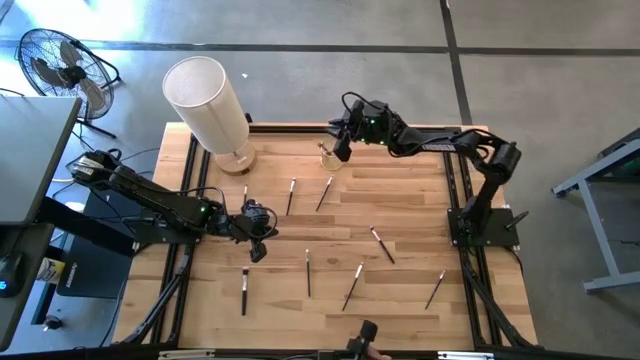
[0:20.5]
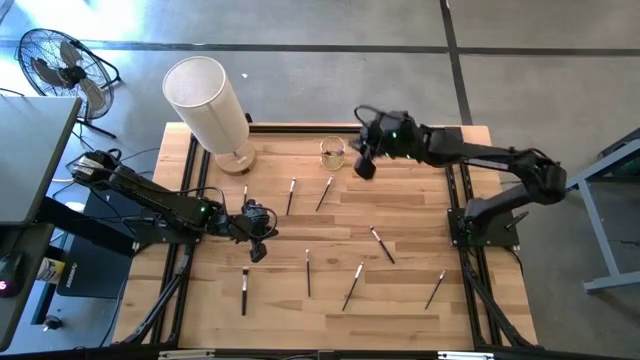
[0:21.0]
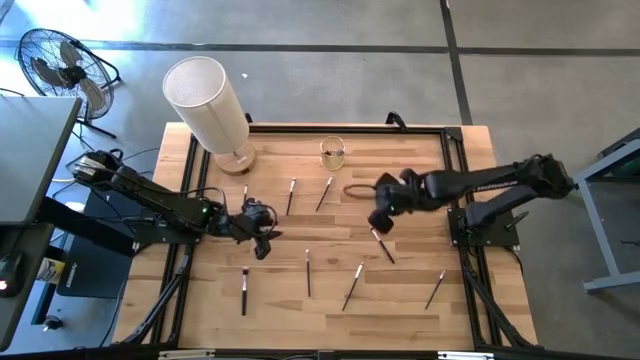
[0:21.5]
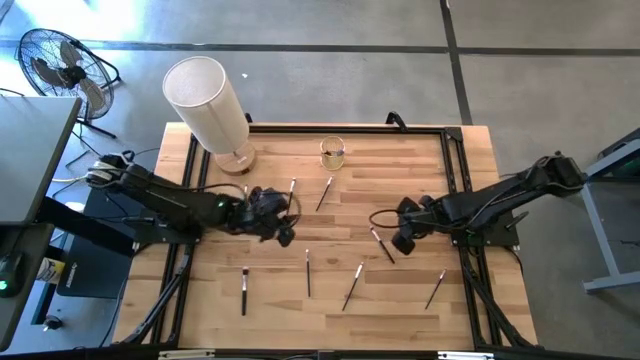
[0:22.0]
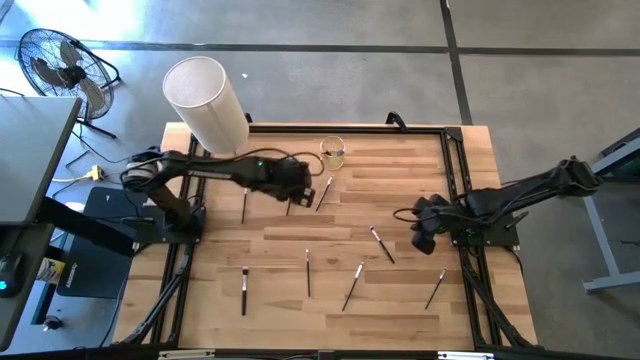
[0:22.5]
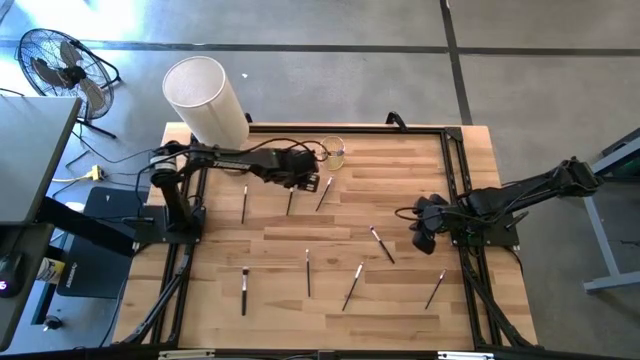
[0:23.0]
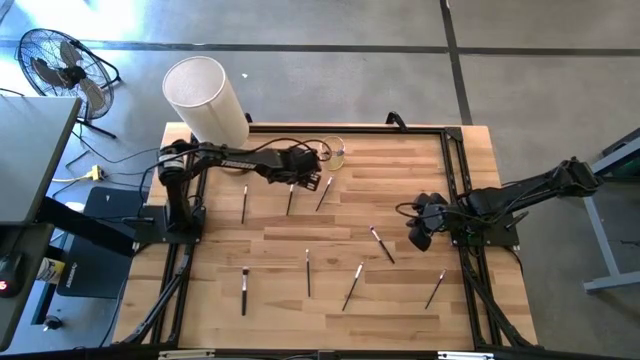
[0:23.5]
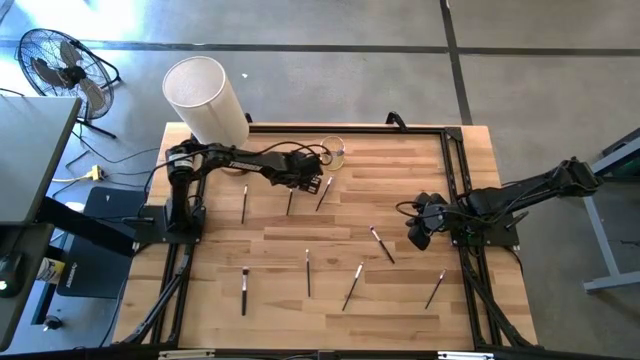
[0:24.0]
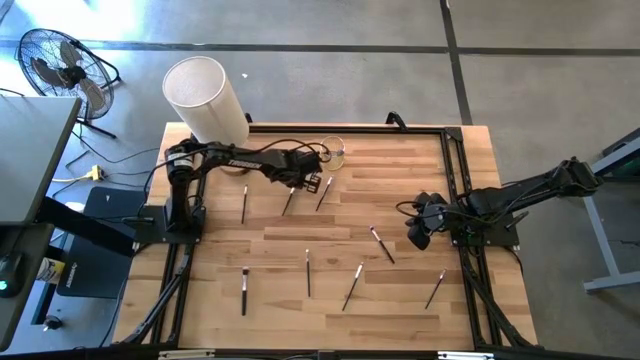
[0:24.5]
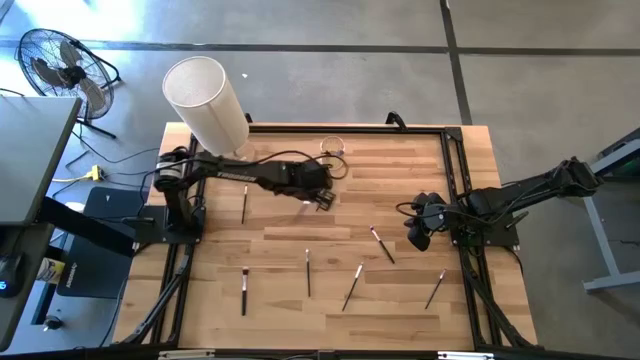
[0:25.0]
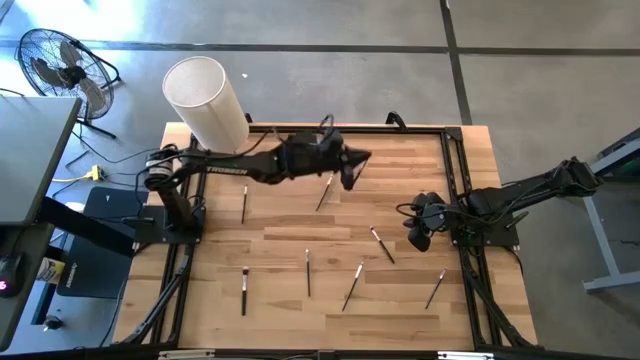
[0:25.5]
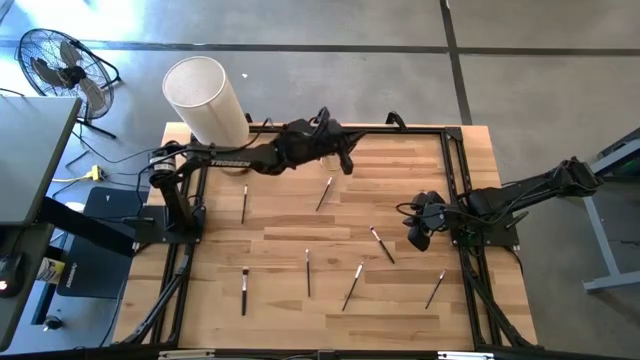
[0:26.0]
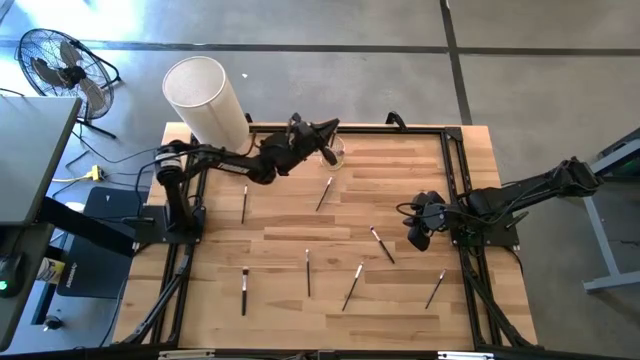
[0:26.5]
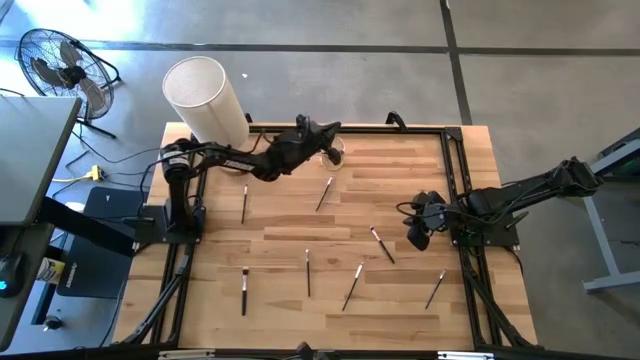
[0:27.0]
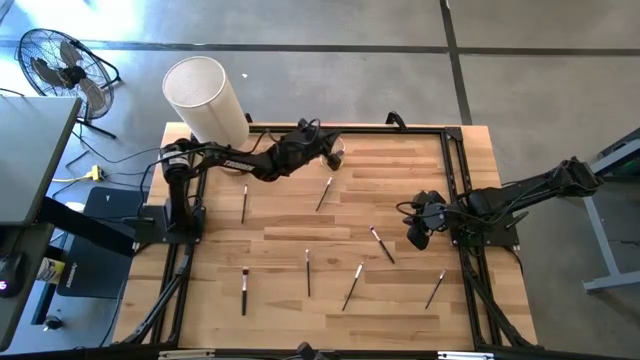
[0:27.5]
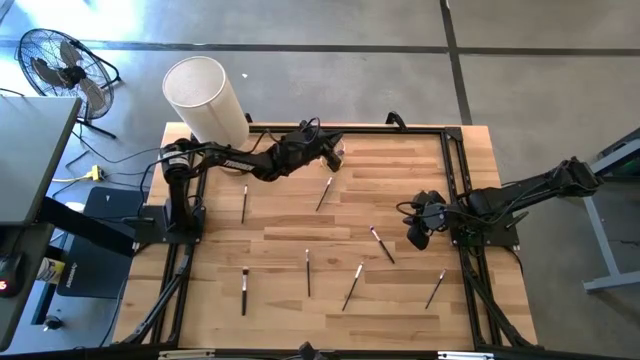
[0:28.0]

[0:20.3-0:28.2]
Task: Sort items
Put the angle shadow brush into the glass

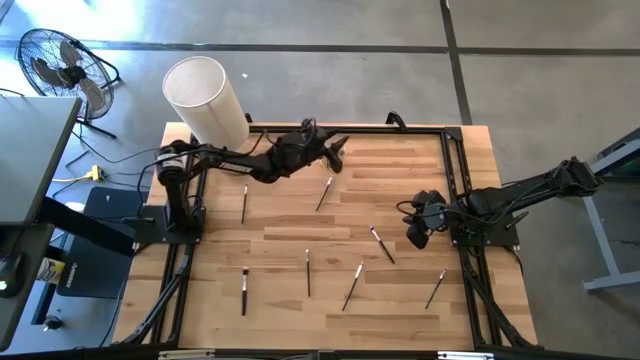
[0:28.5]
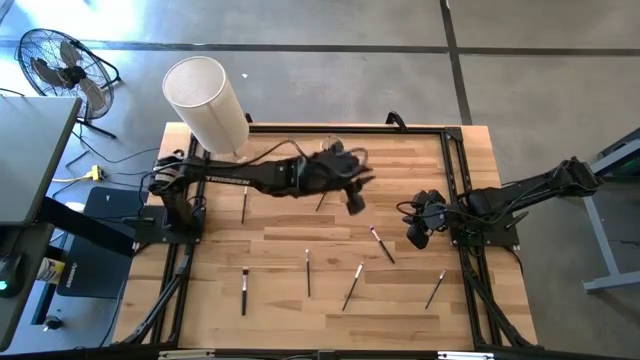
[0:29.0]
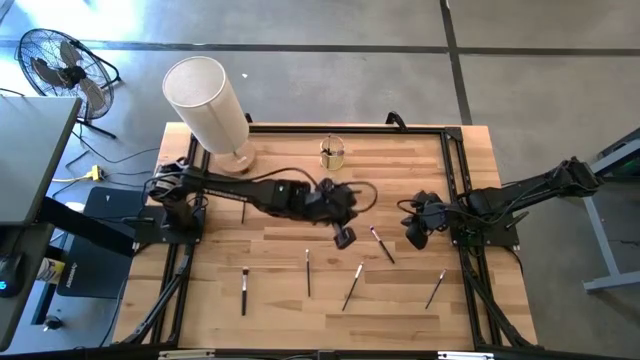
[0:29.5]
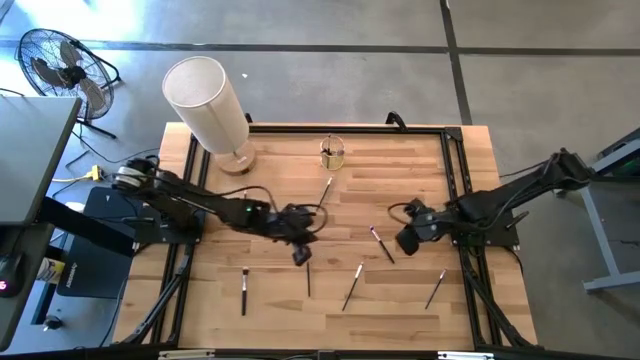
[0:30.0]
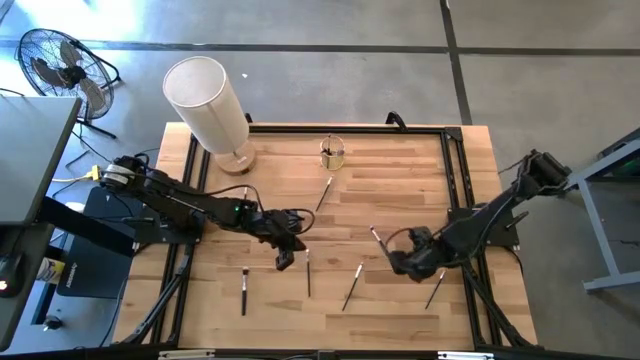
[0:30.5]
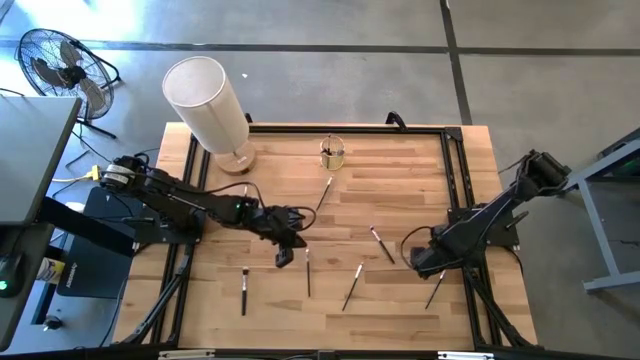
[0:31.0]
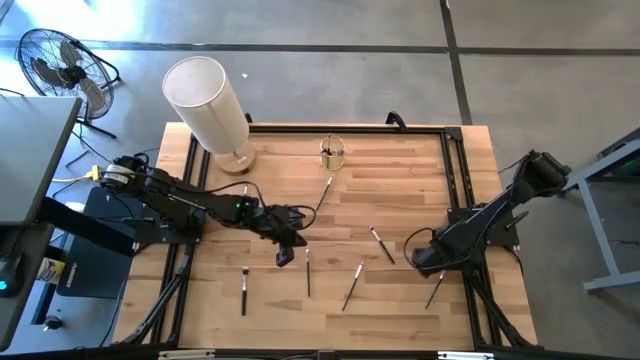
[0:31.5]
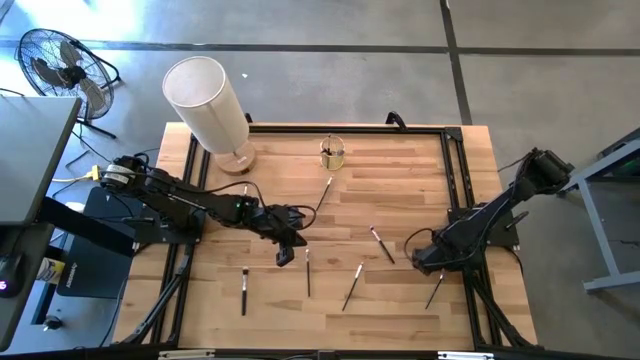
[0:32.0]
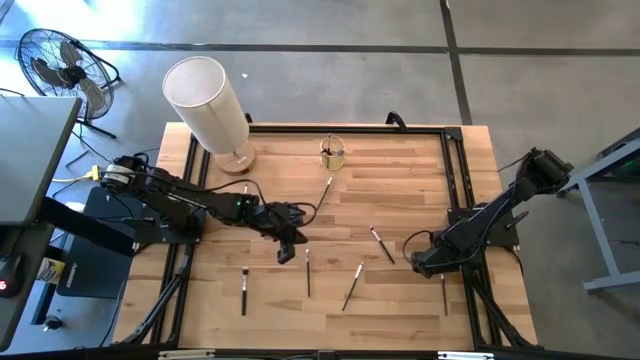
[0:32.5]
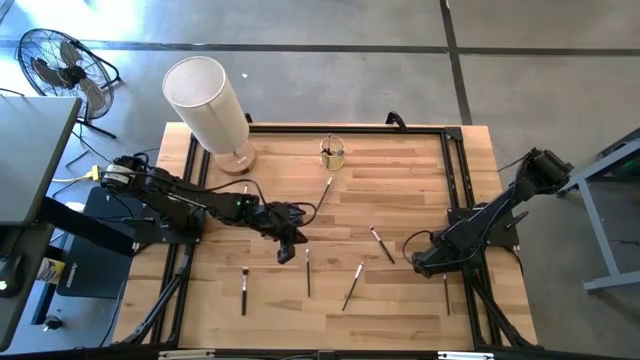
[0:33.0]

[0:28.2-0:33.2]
Put the angle shadow brush into the glass

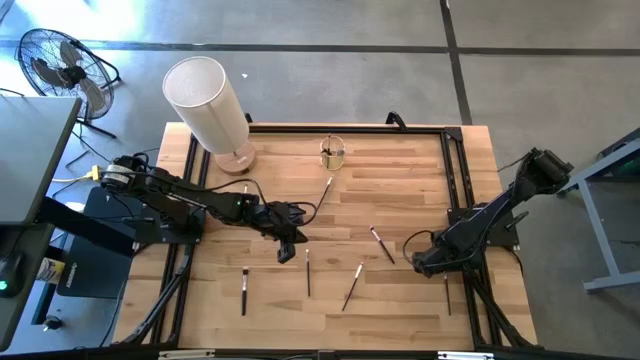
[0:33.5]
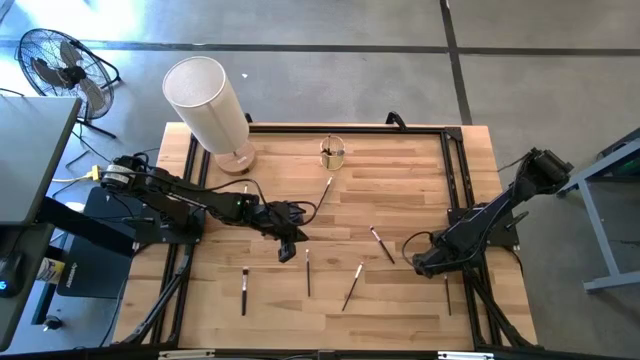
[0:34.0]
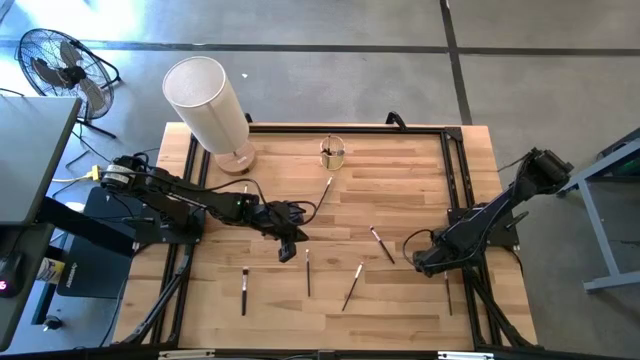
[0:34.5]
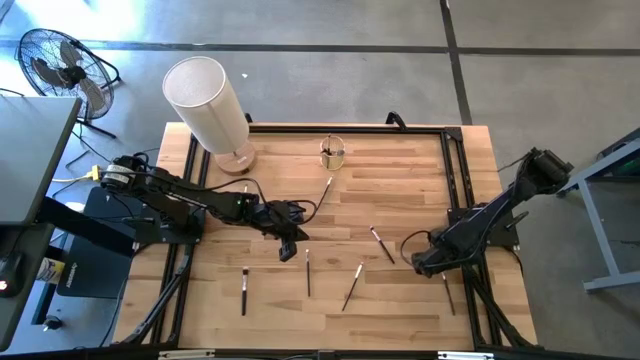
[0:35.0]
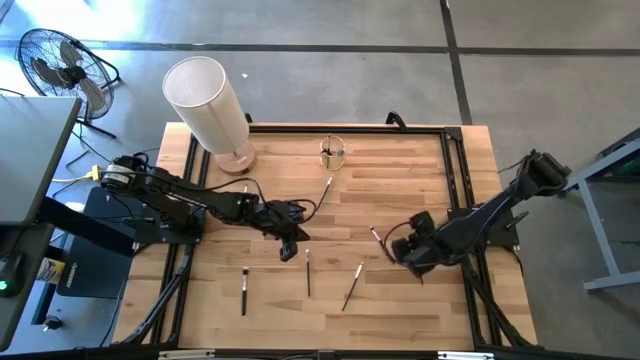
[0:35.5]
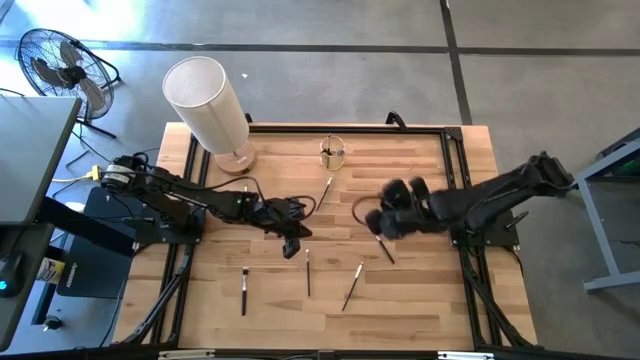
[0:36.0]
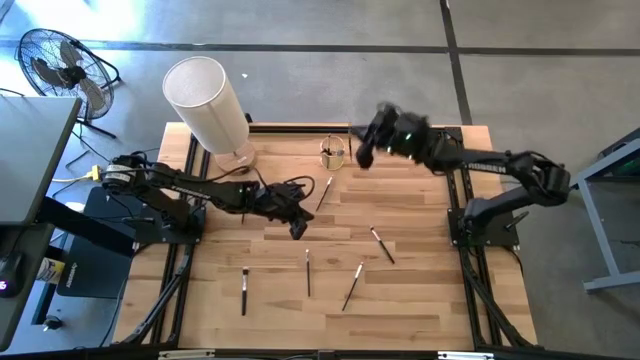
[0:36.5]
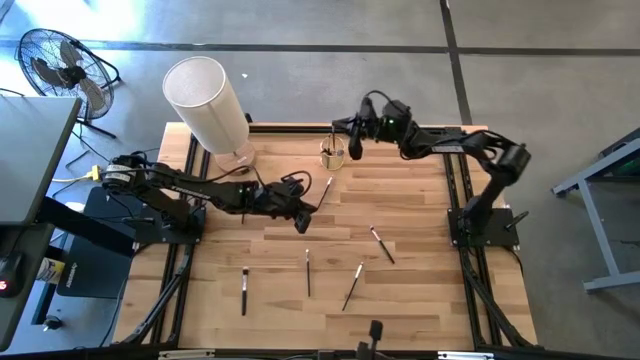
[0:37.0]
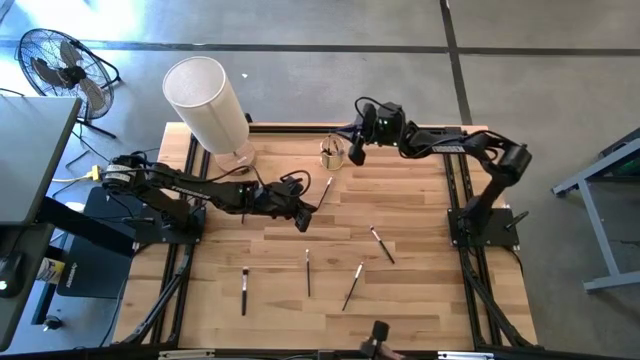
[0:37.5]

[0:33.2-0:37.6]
Put the angle shadow brush into the glass

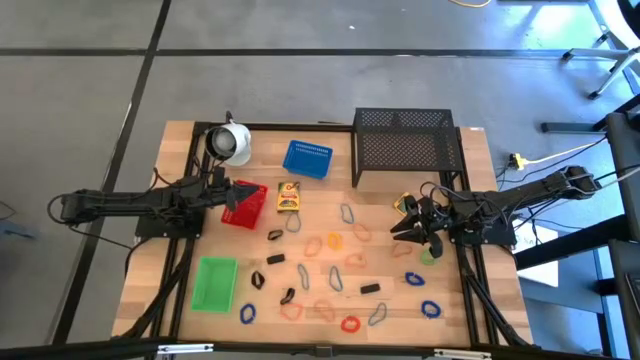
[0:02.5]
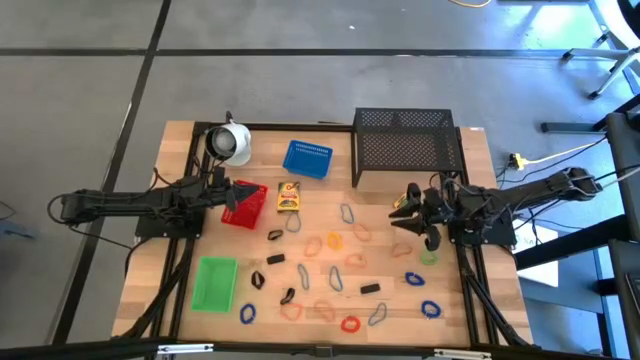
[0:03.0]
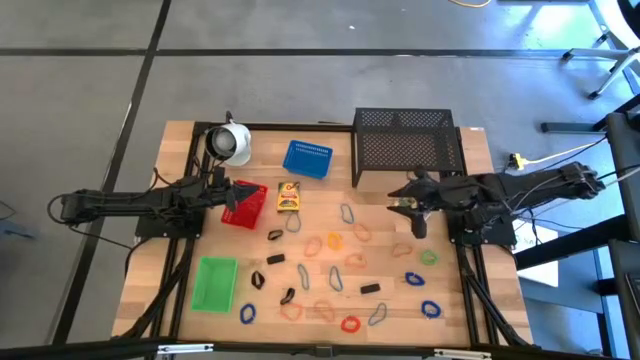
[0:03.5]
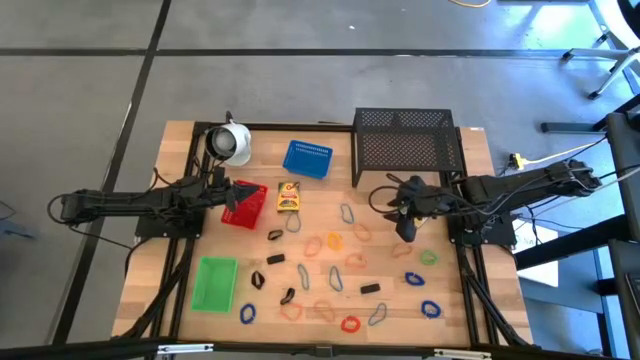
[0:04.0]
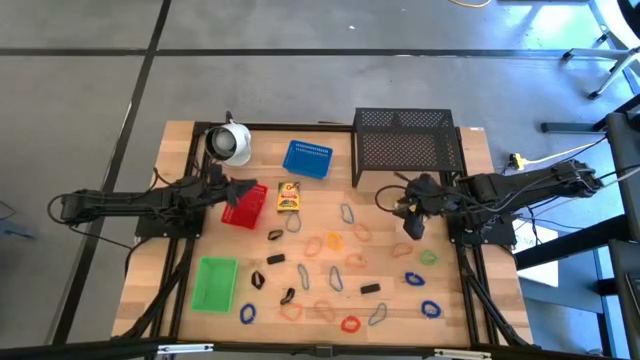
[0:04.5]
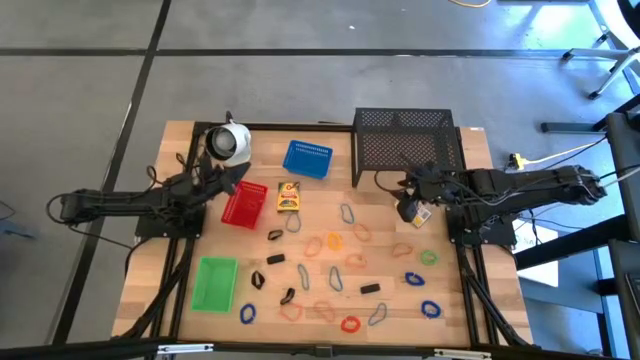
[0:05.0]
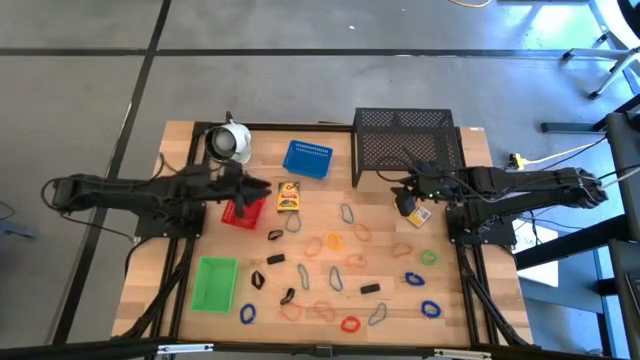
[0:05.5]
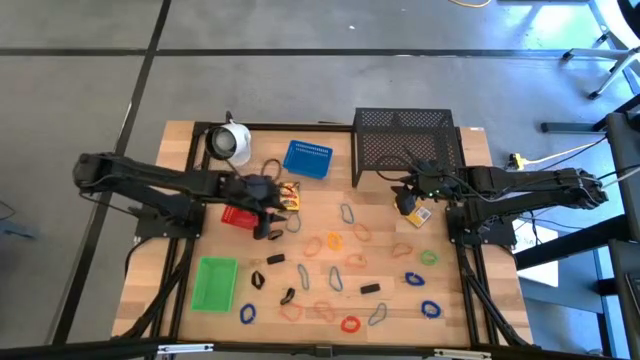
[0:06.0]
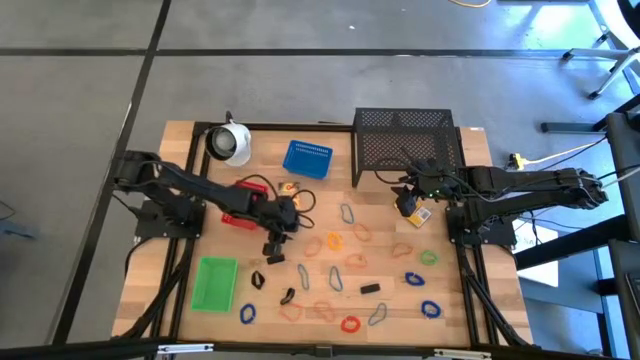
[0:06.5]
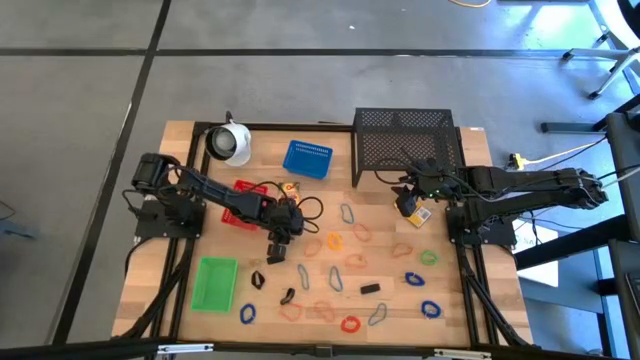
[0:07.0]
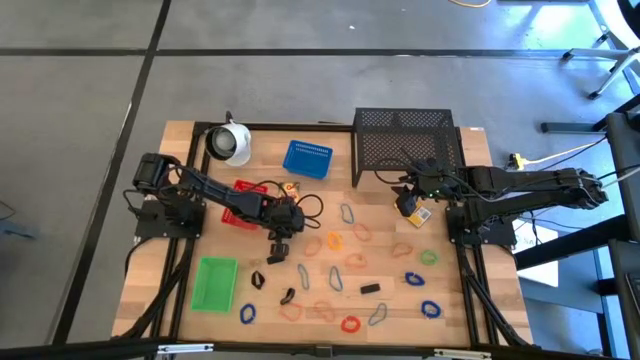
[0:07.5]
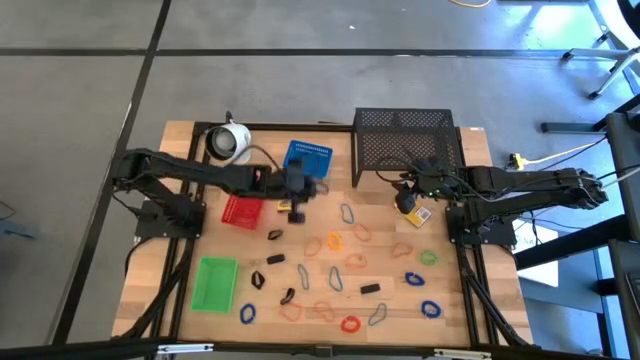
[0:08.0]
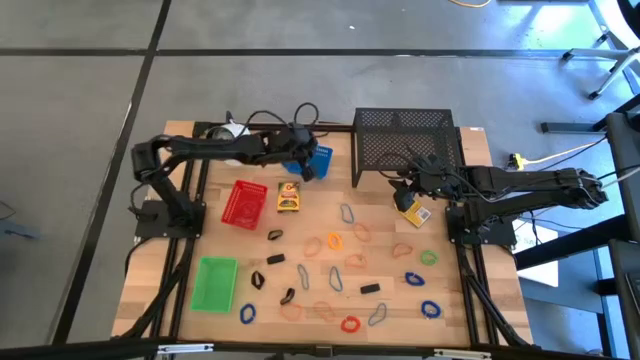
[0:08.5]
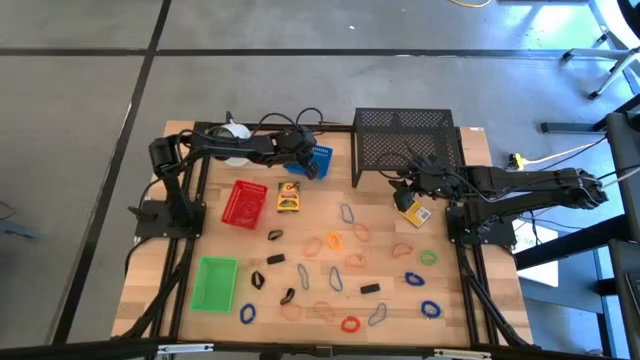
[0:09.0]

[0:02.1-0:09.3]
Task: Pick & Place Office Desk Supplies
Put the blue rubber band into the blue bin
